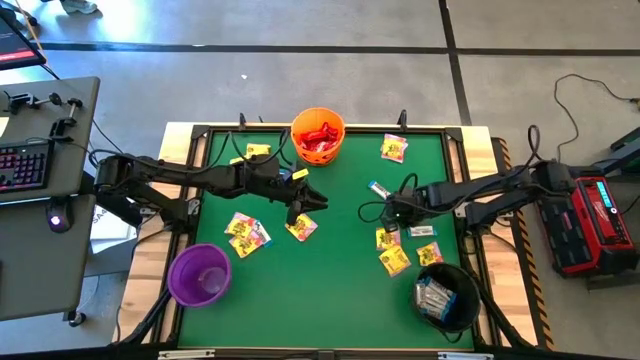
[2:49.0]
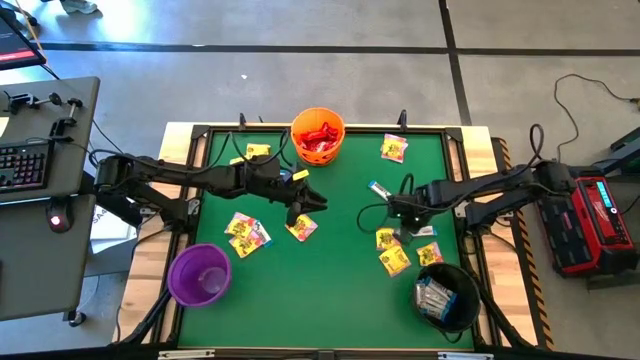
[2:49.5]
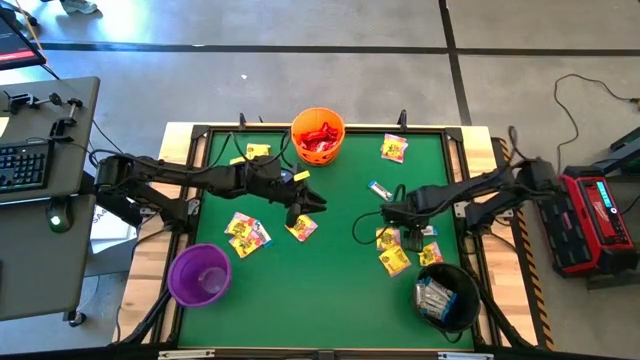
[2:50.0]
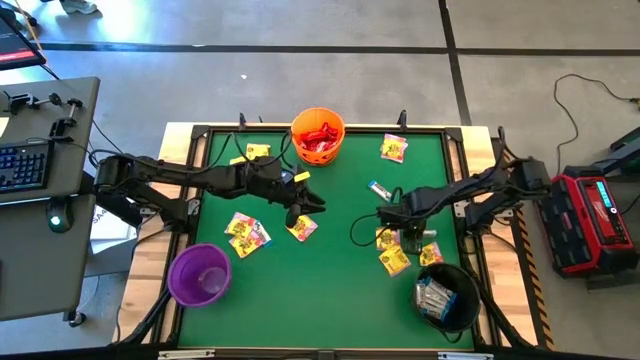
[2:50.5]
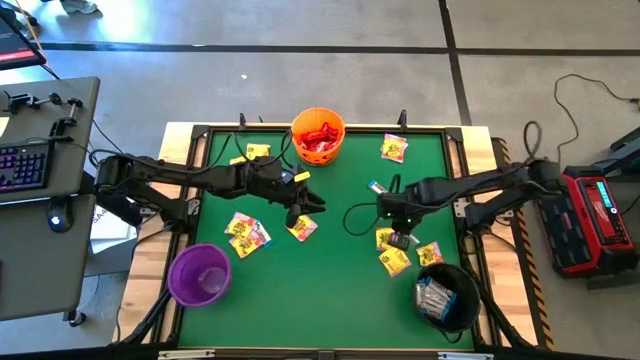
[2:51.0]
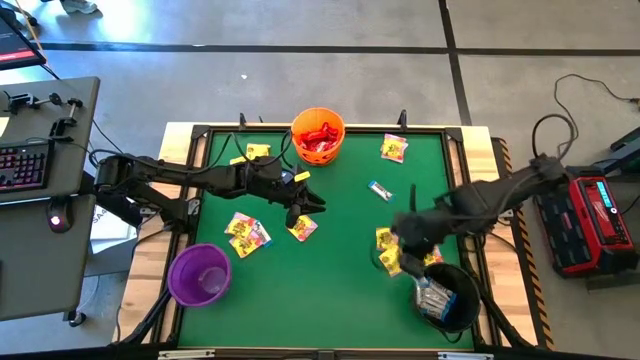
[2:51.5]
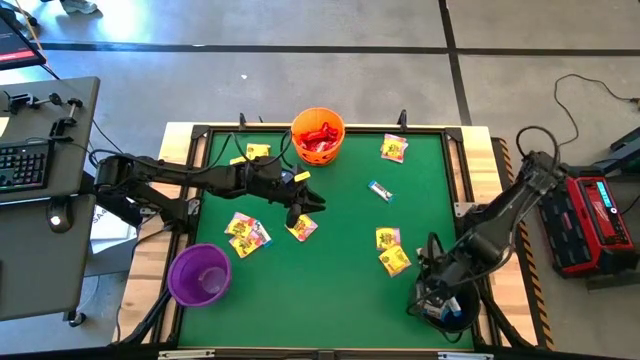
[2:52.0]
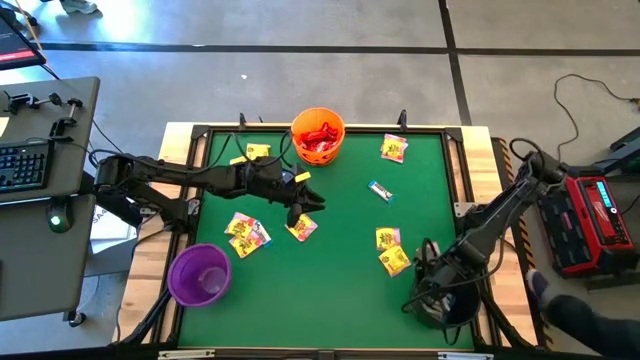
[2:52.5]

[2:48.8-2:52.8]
Task: Sort candy by brand, put in halloween buckets
Put the white chocolate bar into the black bucket

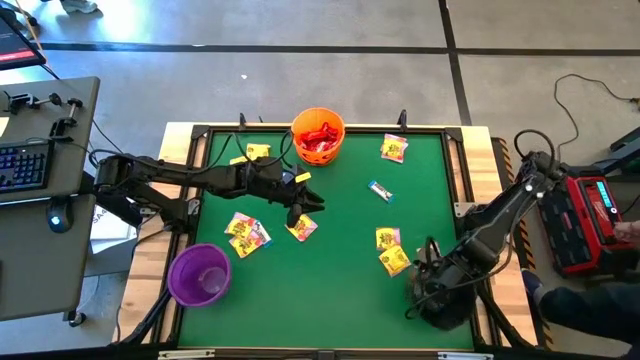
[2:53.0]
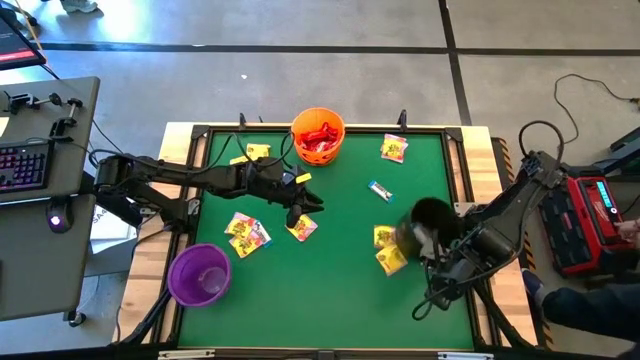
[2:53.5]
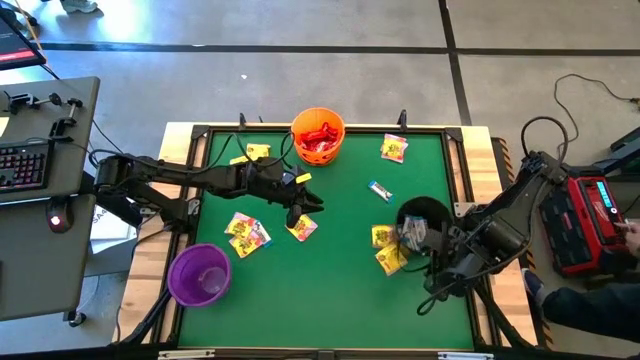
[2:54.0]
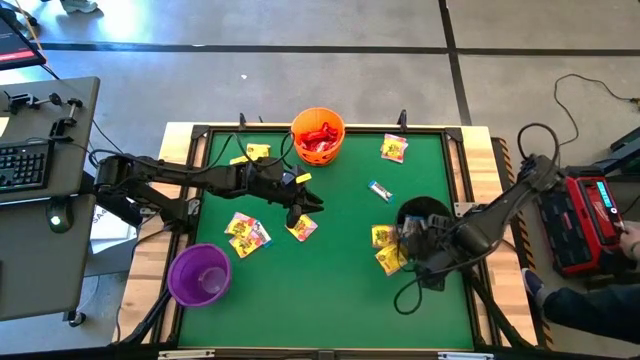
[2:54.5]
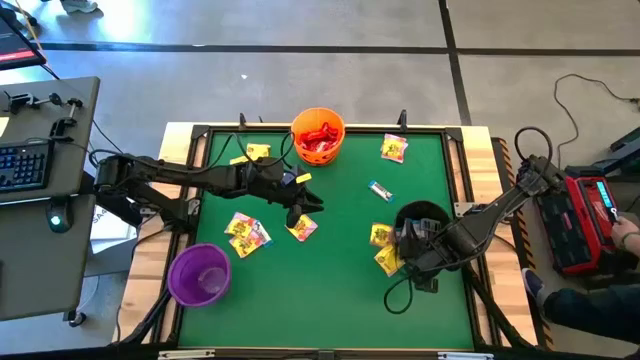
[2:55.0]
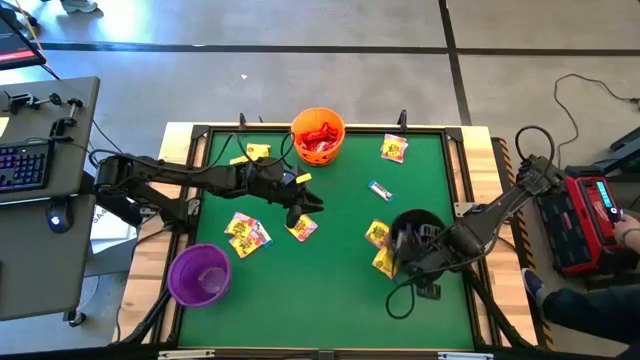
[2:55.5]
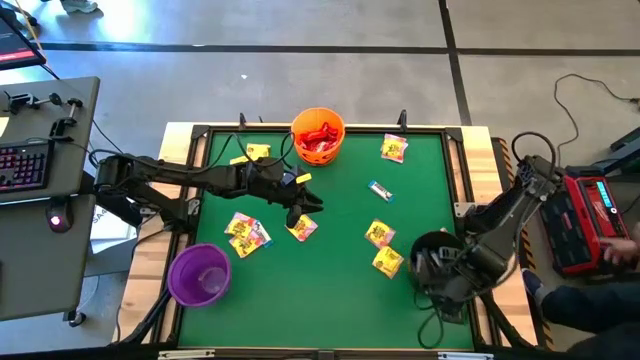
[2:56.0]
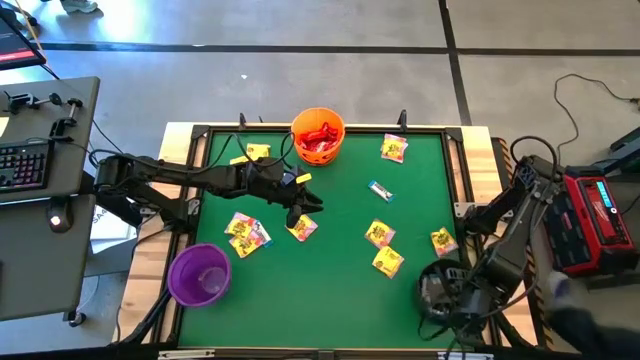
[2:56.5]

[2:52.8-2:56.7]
Adjust the black bucket

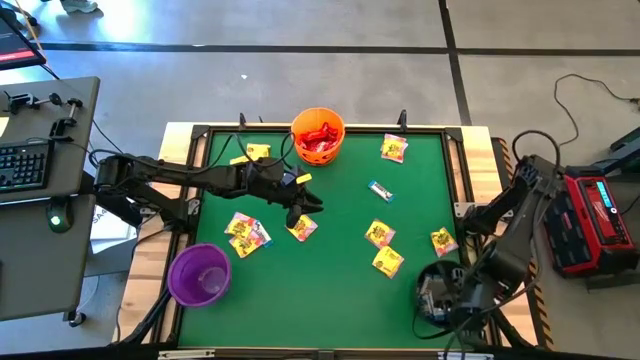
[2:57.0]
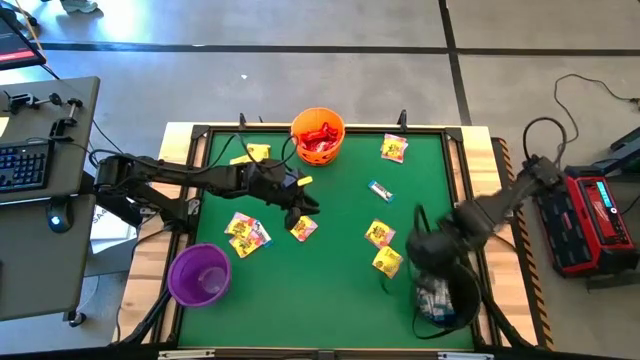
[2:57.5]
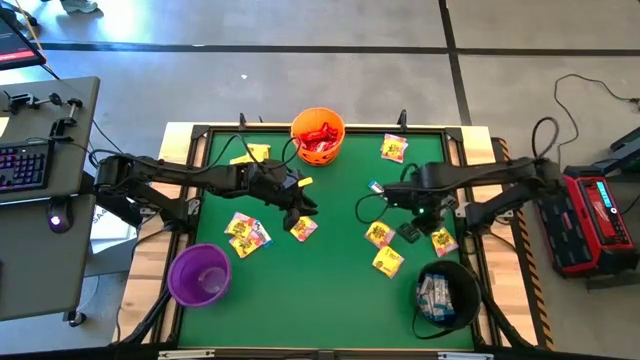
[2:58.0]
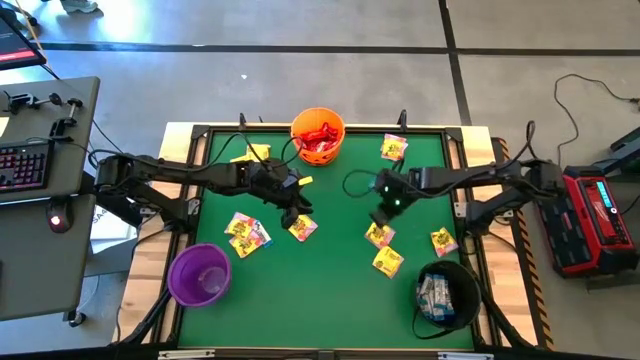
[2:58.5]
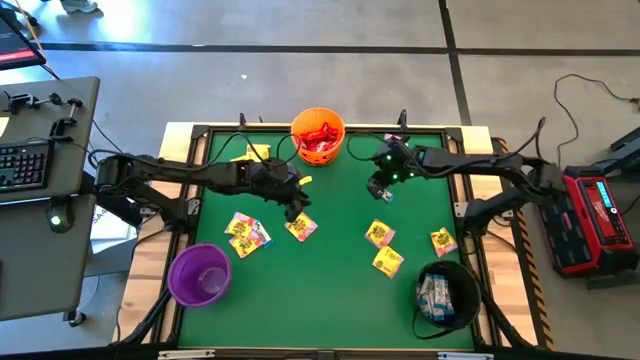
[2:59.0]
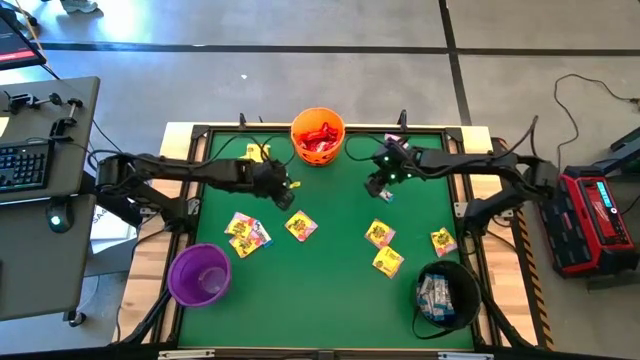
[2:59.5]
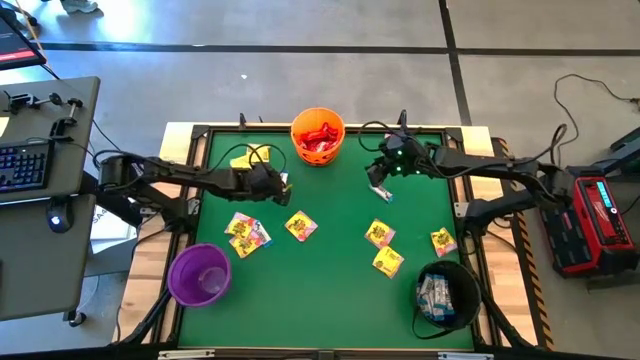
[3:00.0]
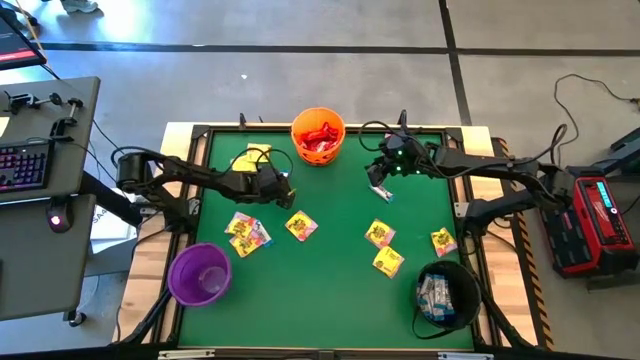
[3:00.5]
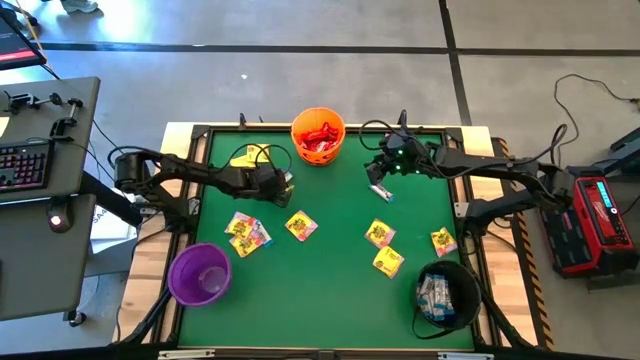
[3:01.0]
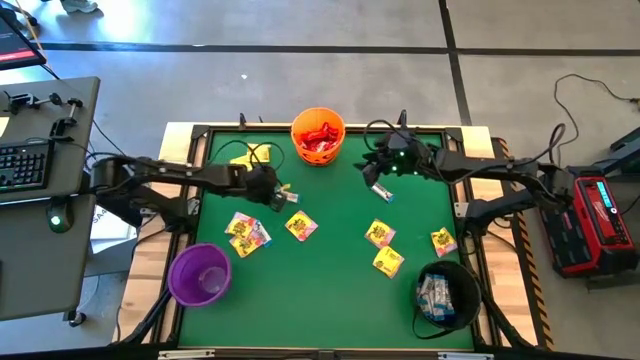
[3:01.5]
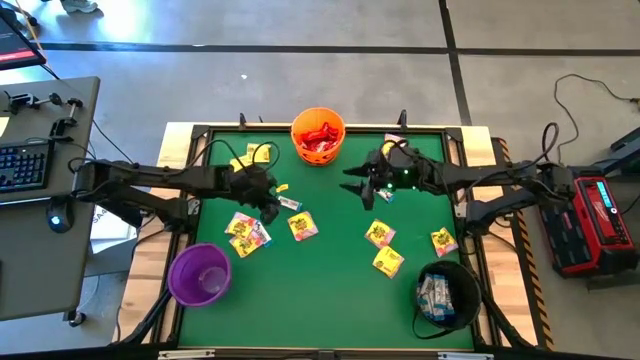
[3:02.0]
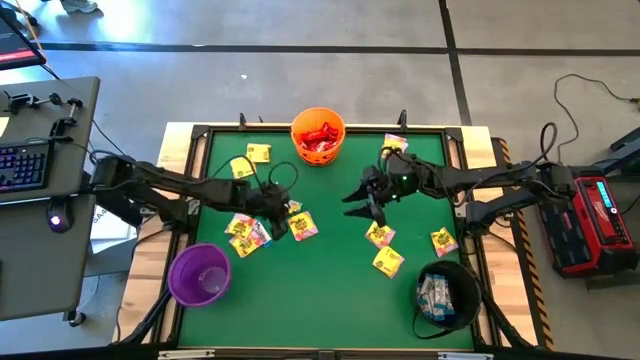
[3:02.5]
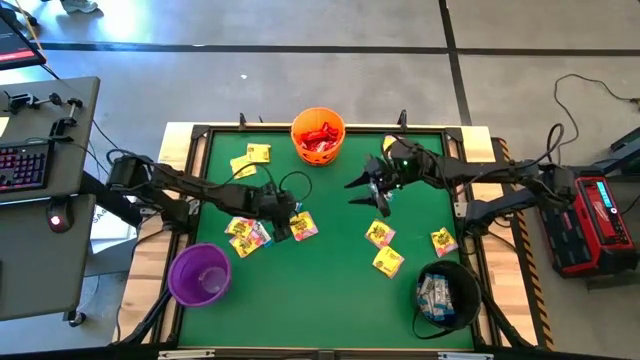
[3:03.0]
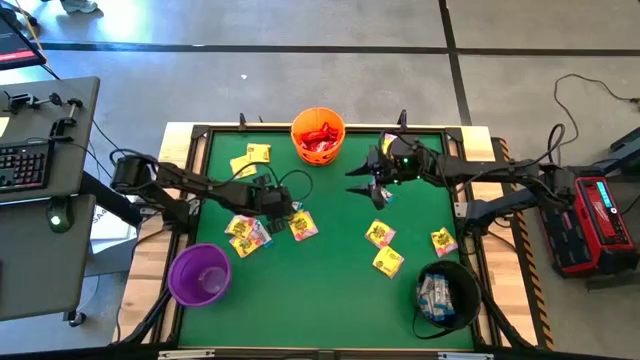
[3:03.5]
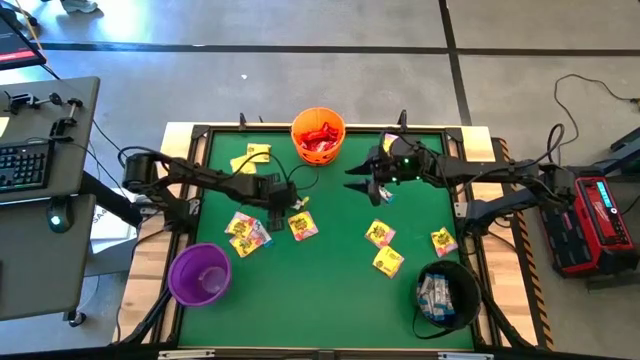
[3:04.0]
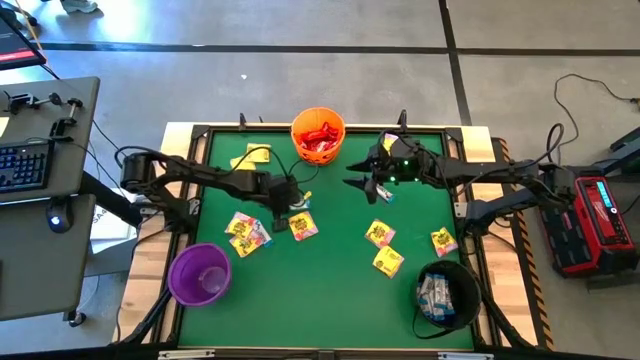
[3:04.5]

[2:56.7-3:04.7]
Put the white chocolate bar into the black bucket

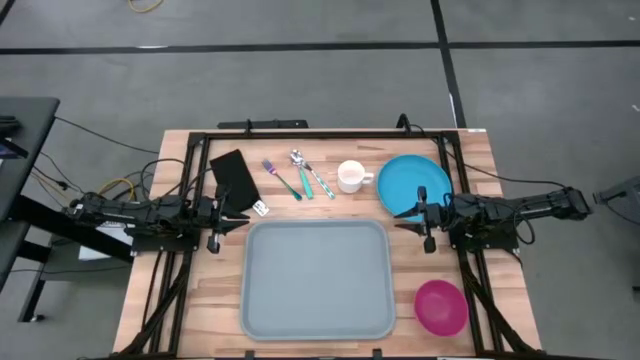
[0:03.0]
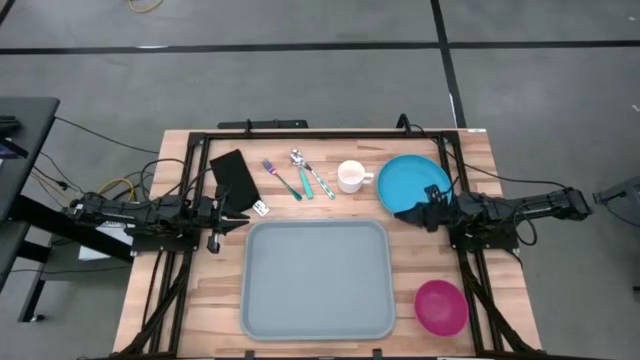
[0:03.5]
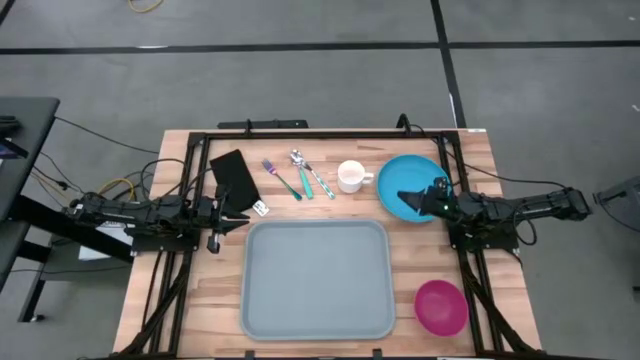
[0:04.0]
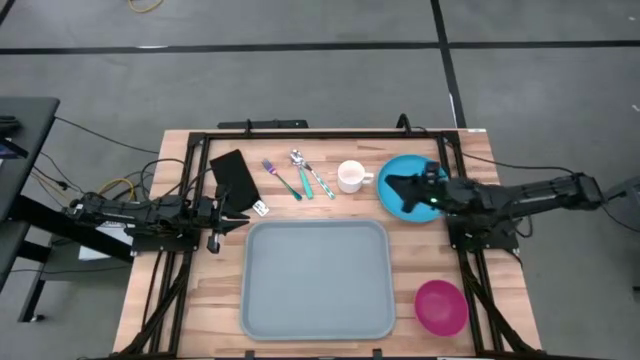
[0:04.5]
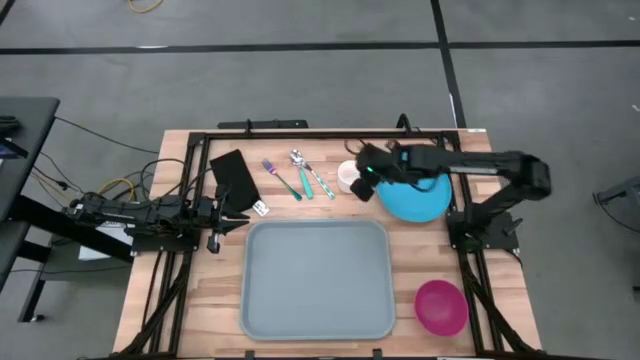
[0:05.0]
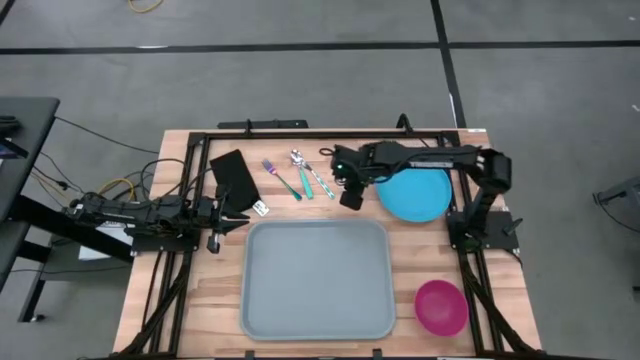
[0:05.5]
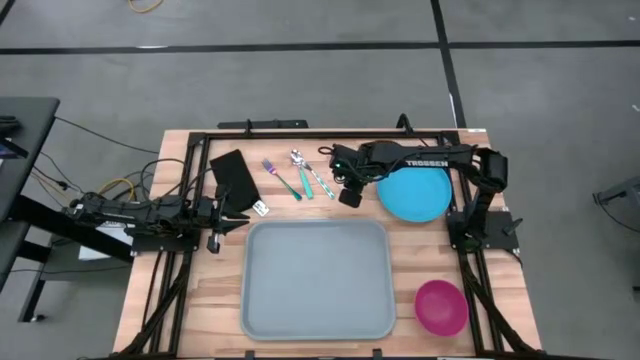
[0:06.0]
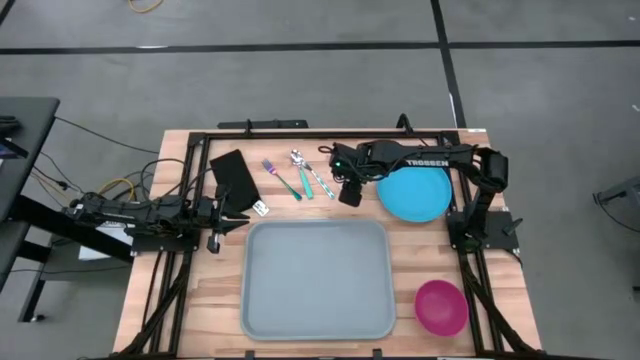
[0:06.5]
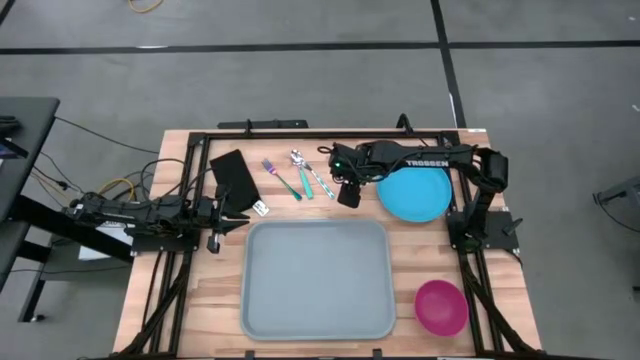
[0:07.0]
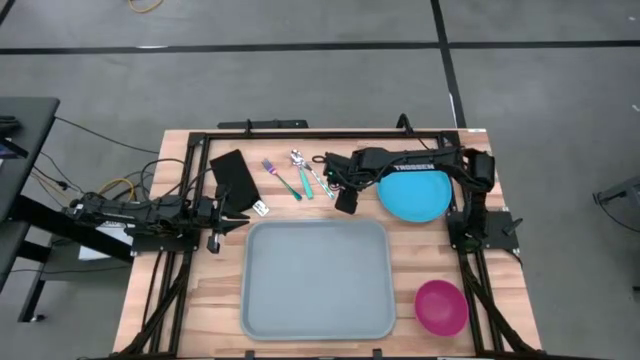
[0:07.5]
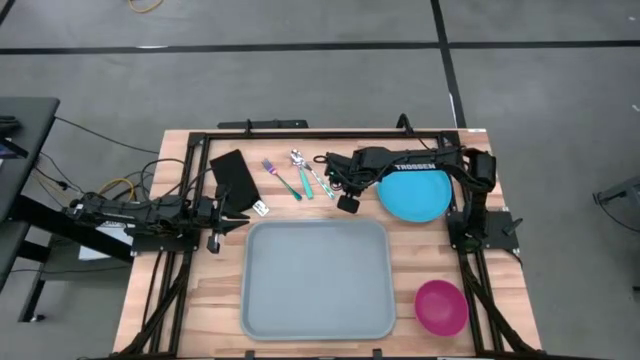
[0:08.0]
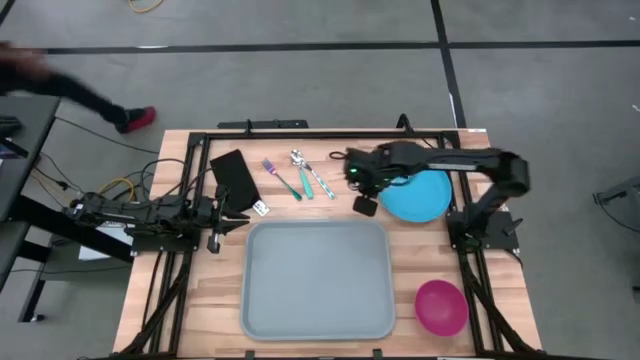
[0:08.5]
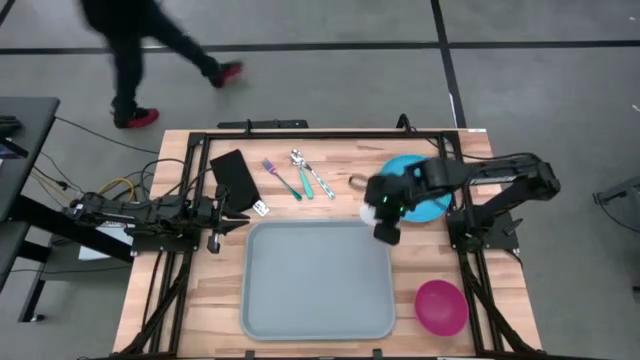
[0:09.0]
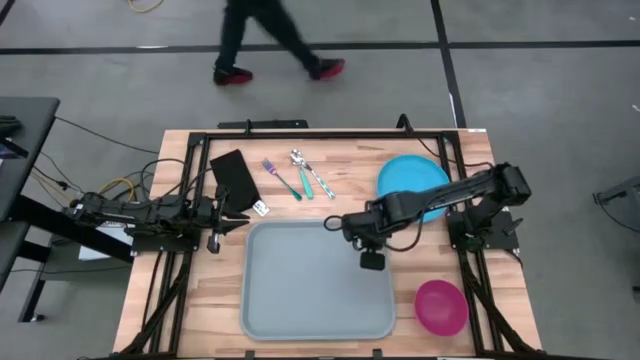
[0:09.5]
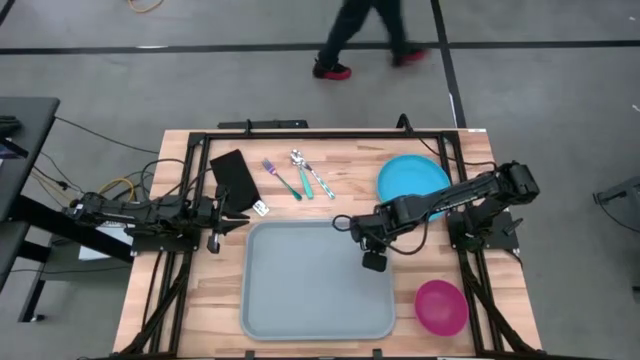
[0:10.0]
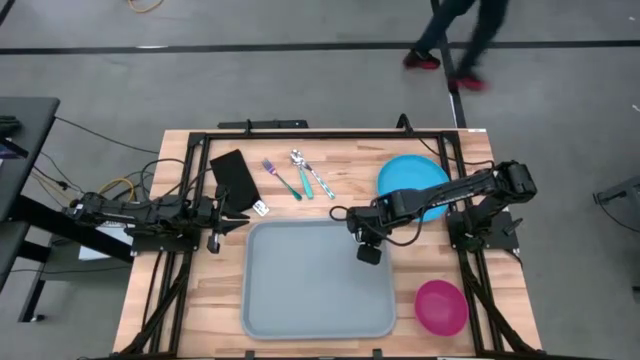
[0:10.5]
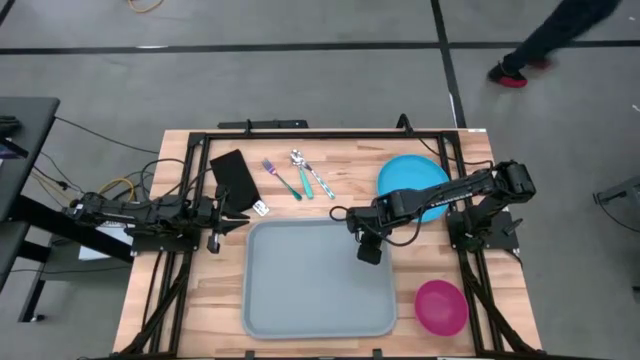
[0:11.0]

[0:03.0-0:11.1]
Task: Set up tray
Put the white mug to the top right of the gray serving tray
